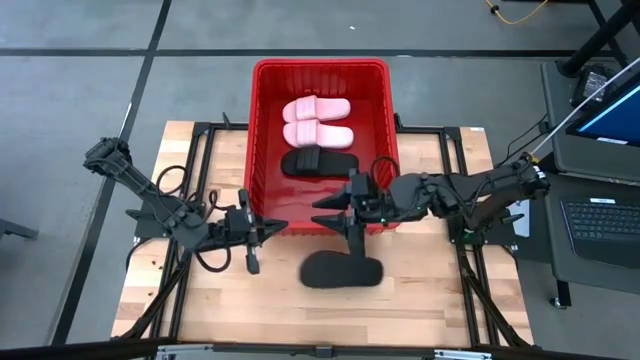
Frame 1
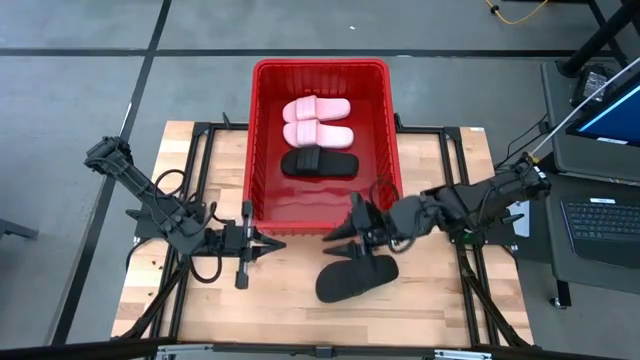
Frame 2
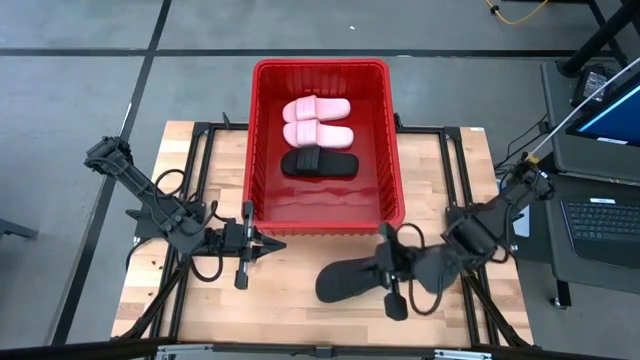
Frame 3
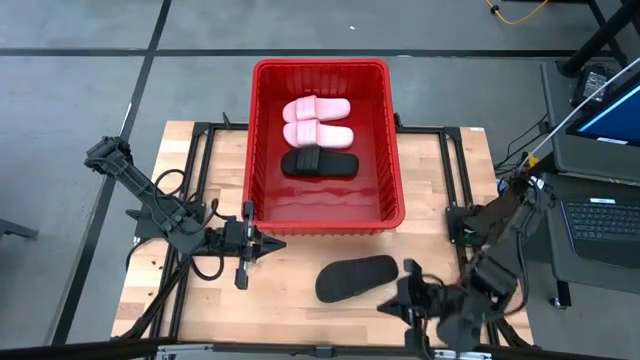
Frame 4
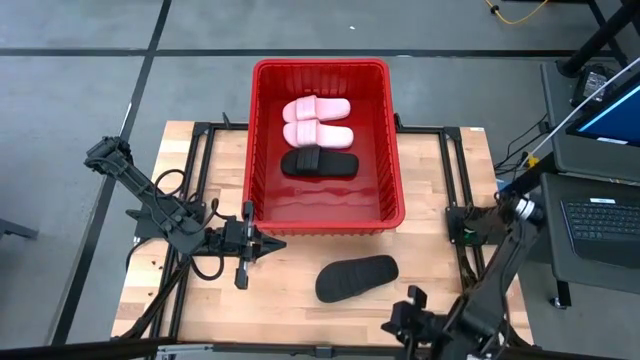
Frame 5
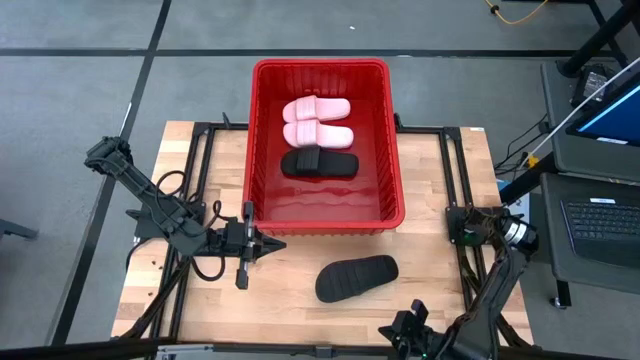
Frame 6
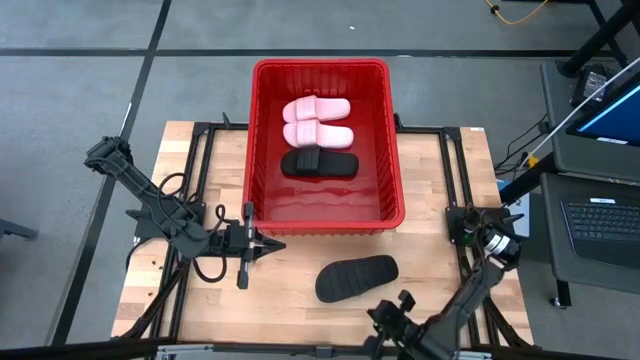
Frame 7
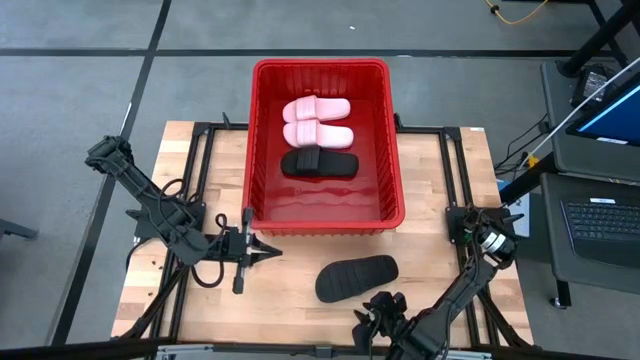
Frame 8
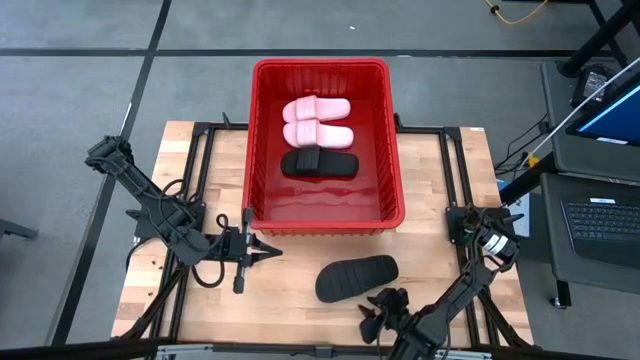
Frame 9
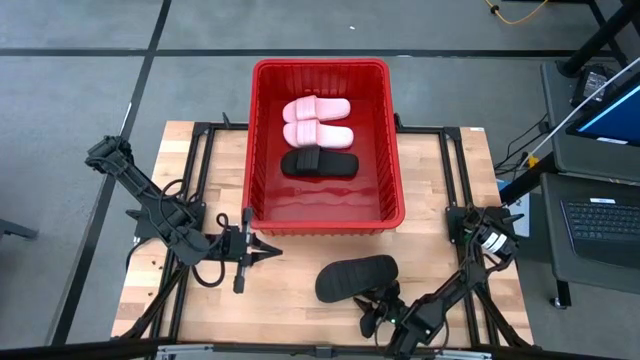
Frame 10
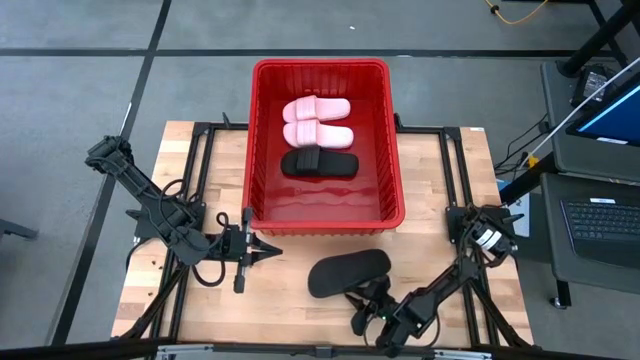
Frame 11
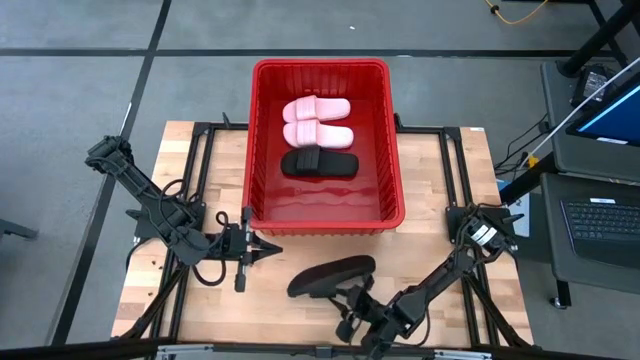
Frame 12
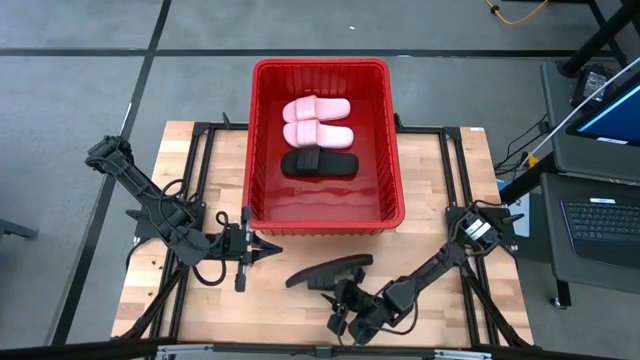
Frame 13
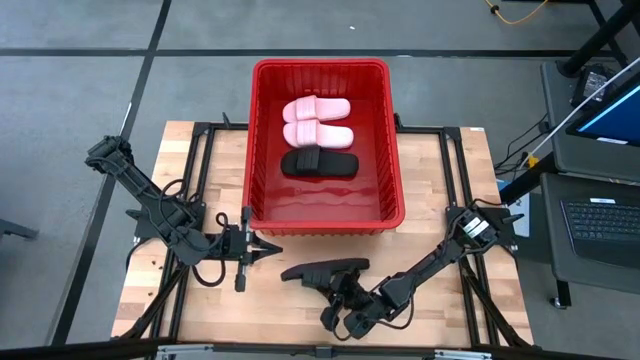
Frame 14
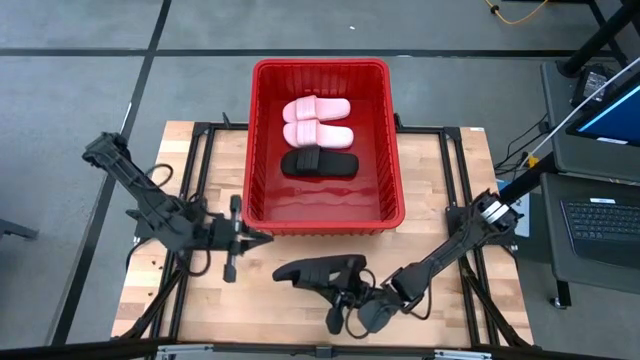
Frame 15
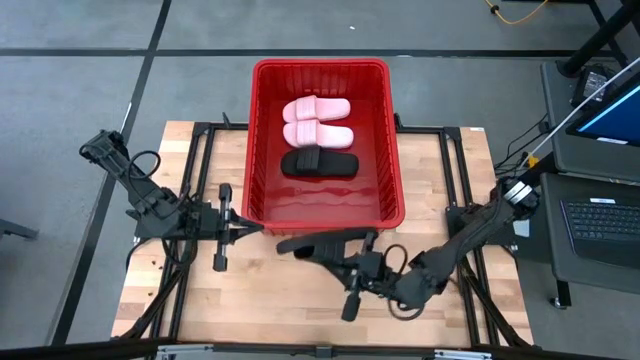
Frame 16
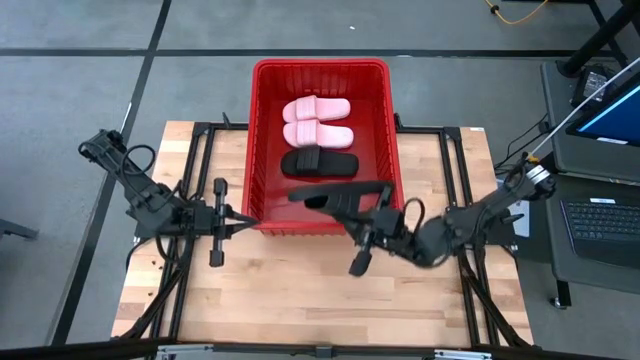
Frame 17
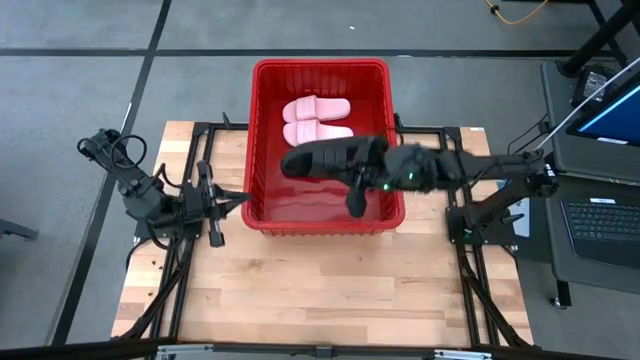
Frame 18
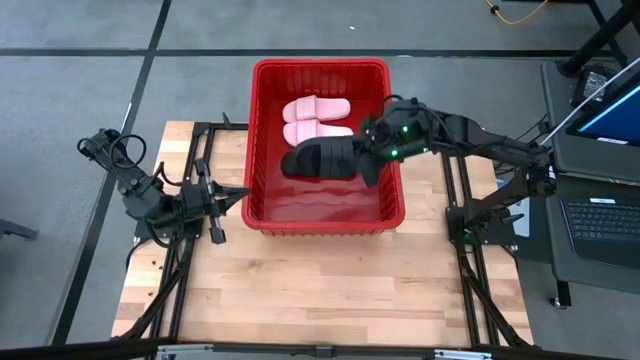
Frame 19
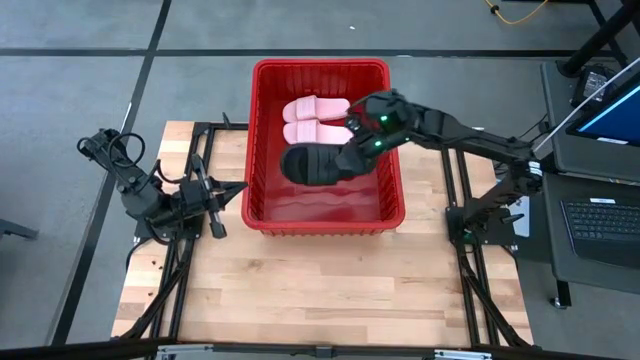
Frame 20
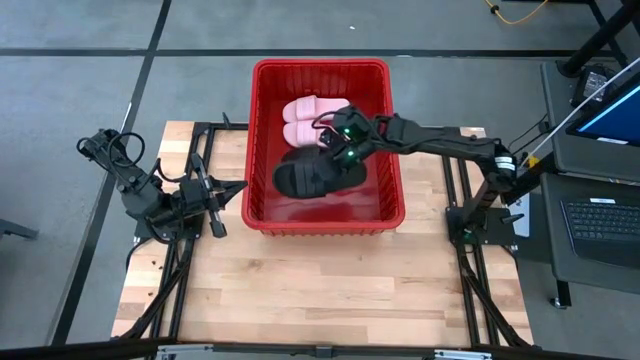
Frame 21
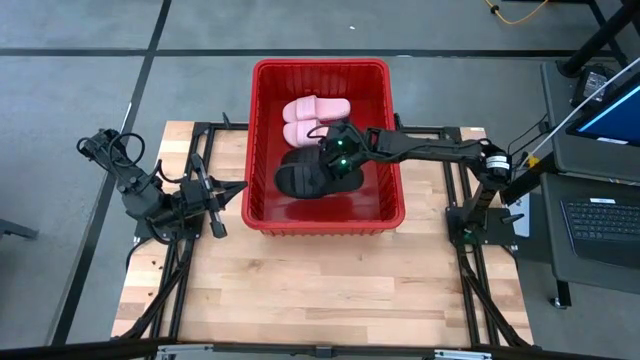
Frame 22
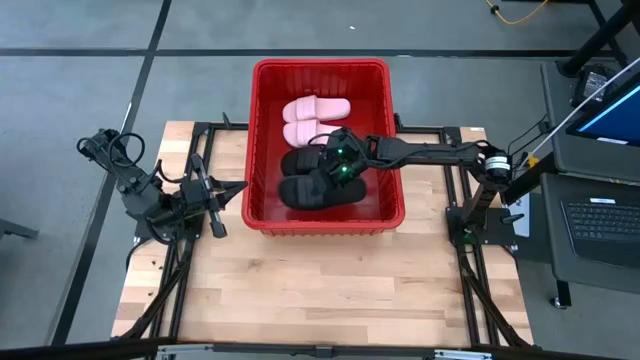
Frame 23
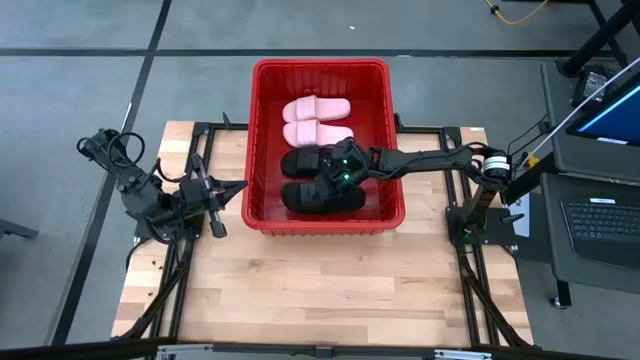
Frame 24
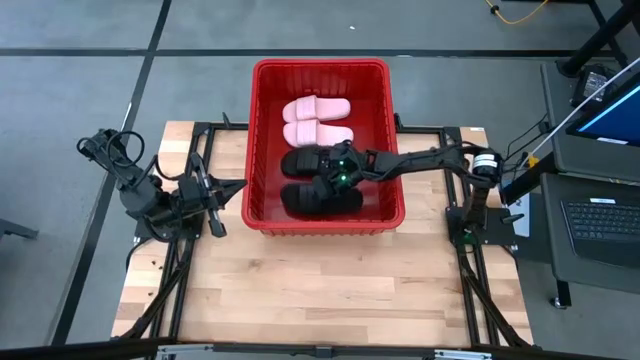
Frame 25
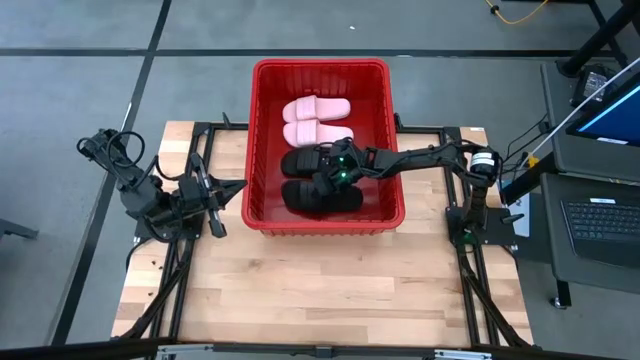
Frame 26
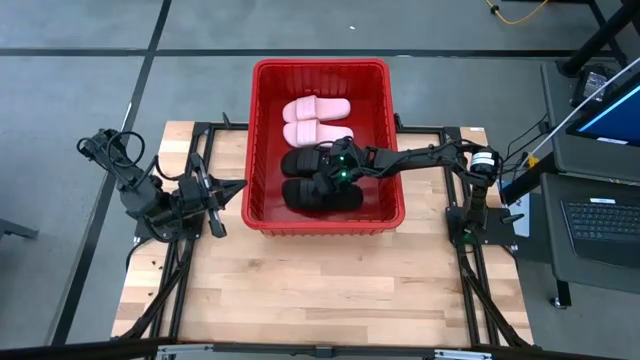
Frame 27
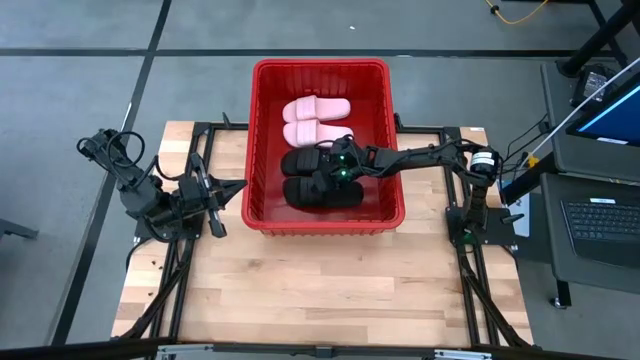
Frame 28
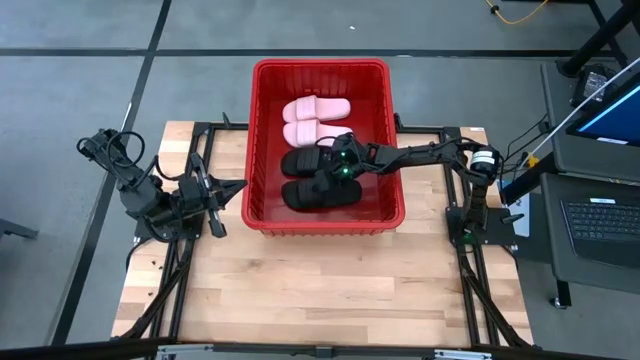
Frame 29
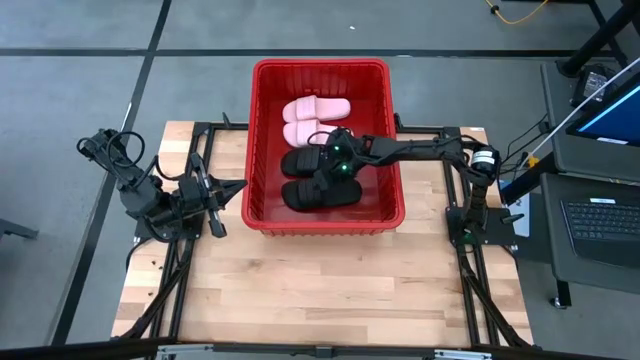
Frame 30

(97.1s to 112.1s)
Task: Pick and place slides into bin
Put the black slide into the bin

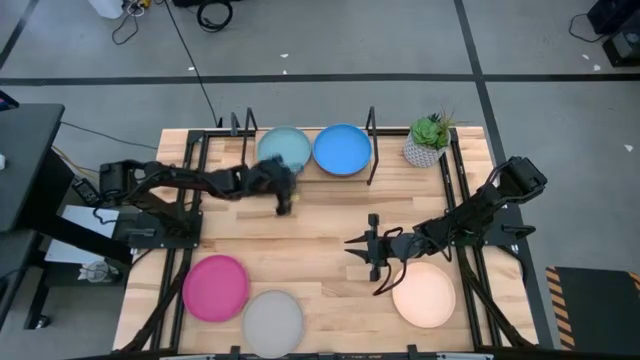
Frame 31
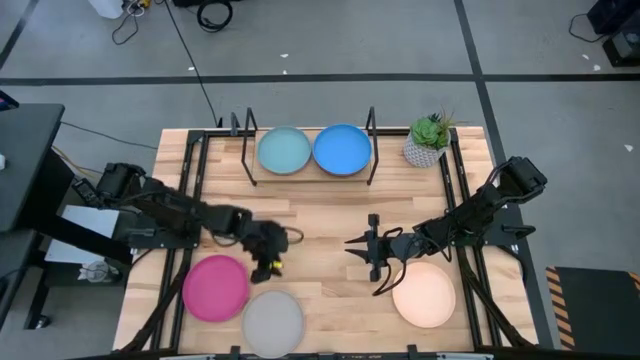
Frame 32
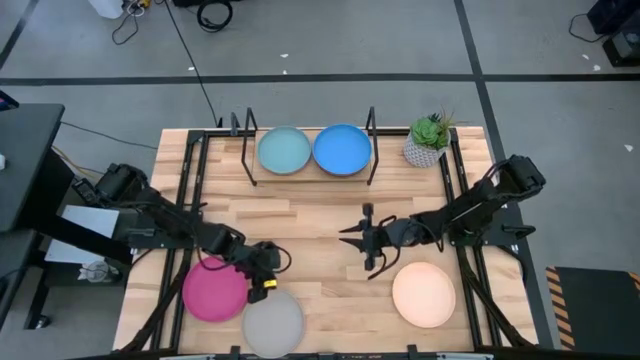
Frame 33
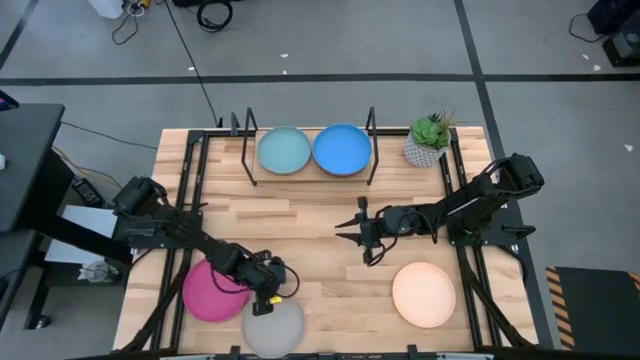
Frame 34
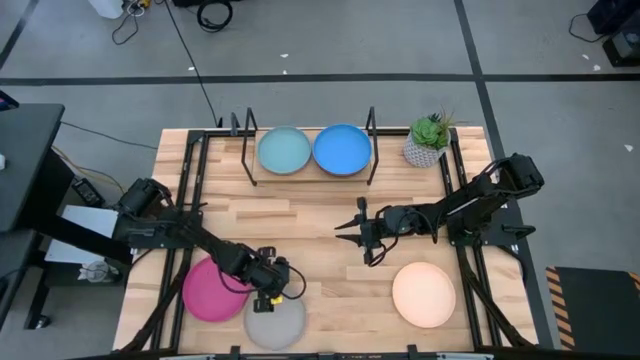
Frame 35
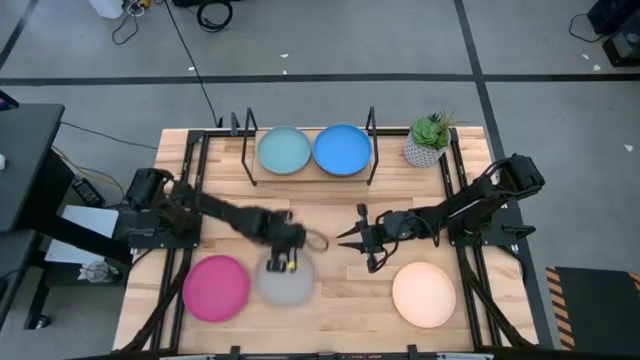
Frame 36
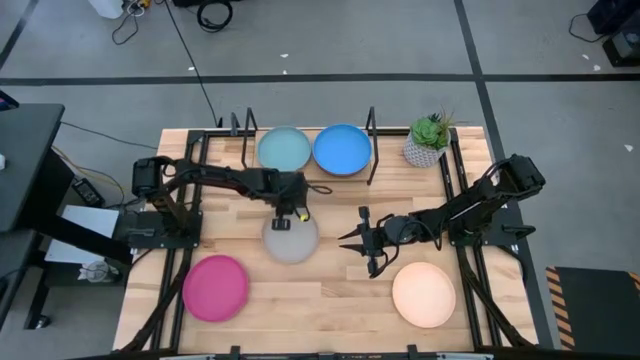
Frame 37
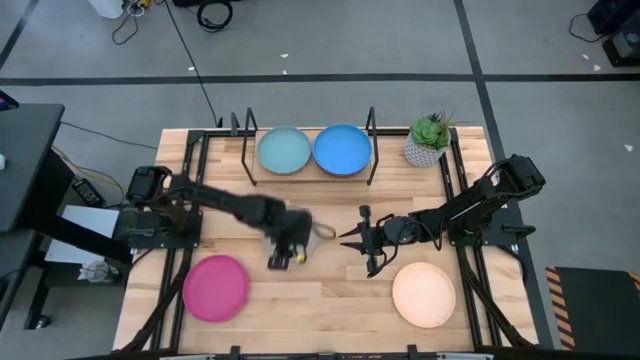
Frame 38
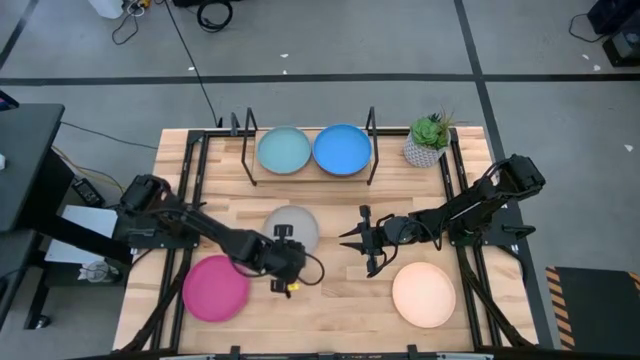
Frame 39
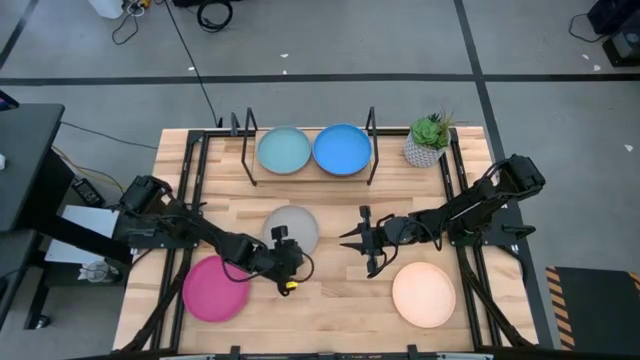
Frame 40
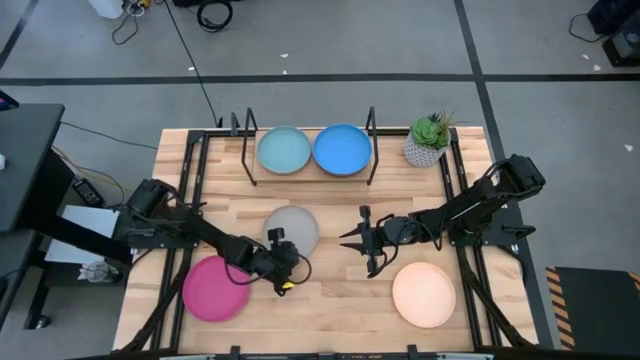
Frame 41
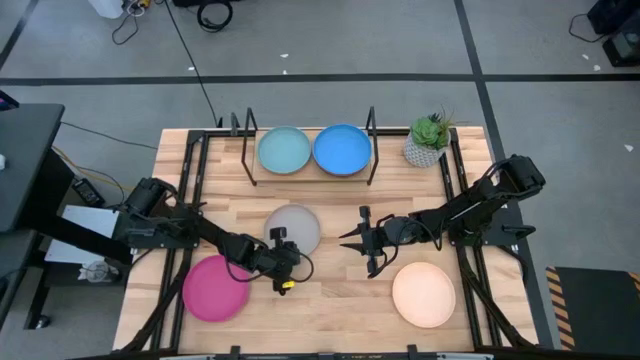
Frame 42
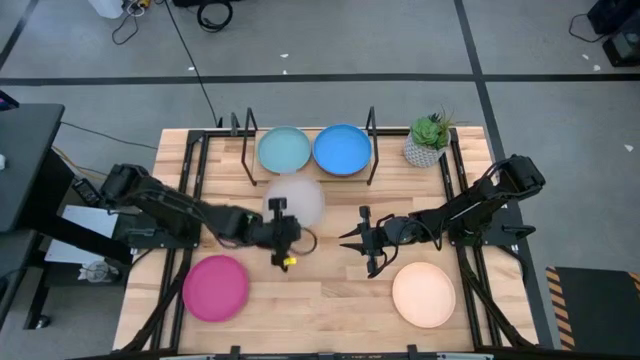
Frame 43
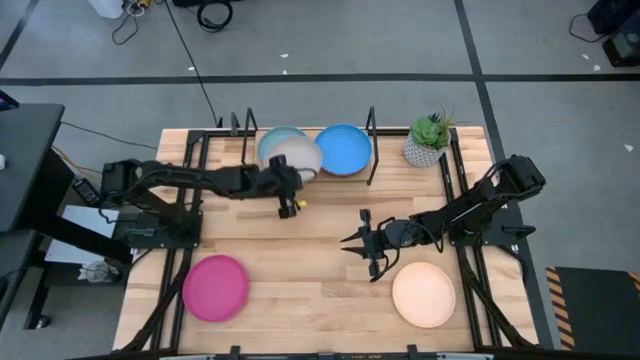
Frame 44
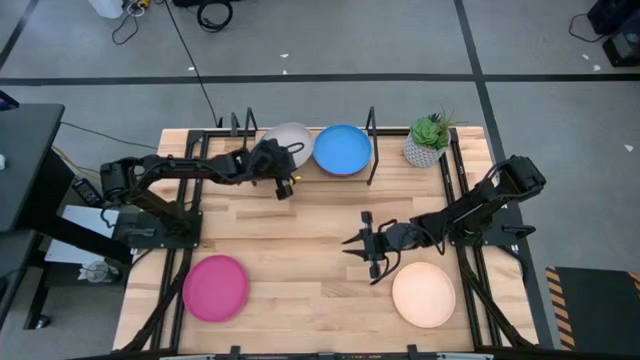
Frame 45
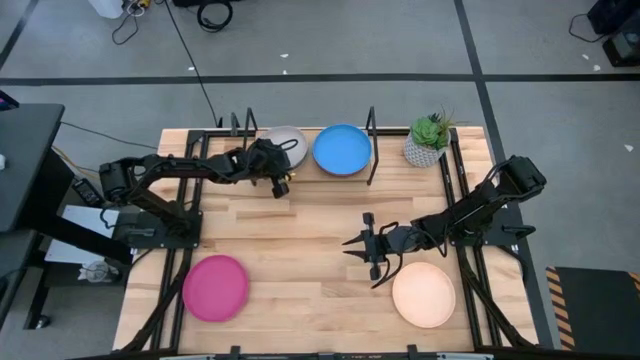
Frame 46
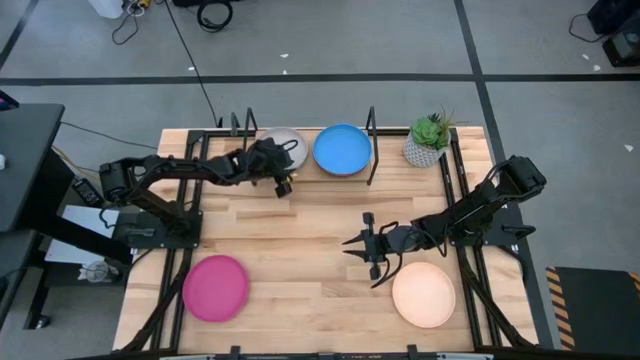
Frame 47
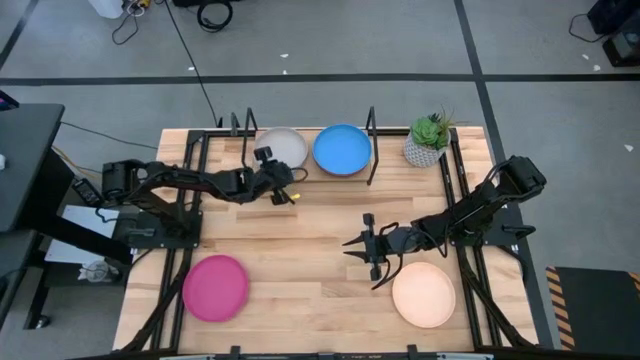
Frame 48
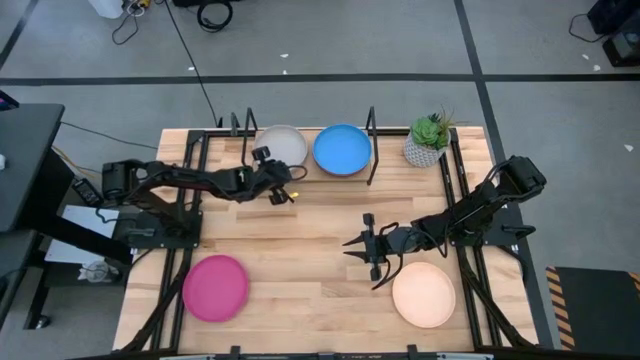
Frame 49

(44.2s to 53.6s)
Task: Place and stack plates onto a shelf
Stack the gray plate on top of the light blue plate on the shelf
